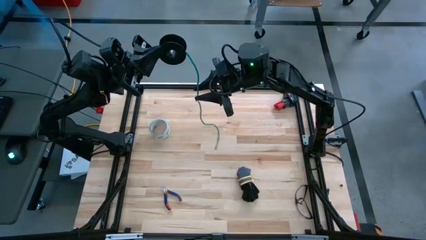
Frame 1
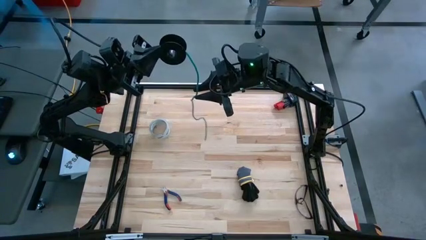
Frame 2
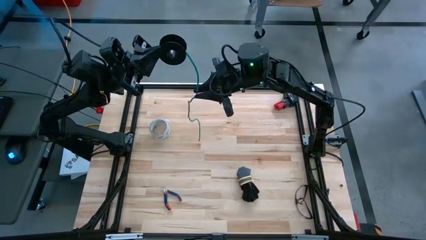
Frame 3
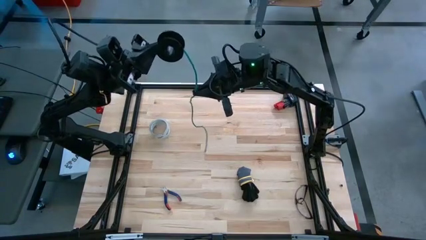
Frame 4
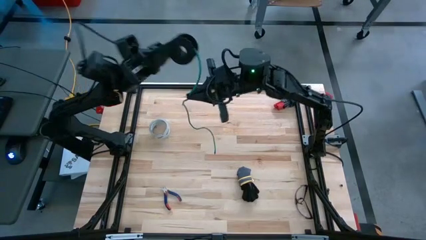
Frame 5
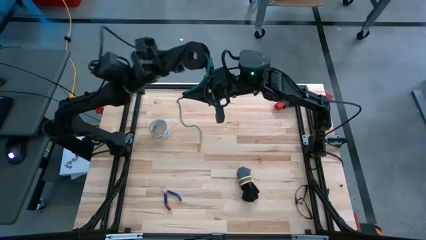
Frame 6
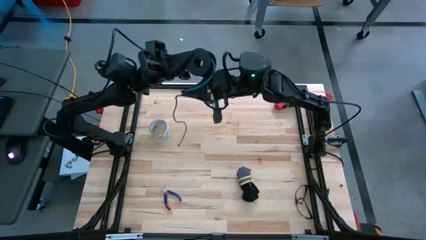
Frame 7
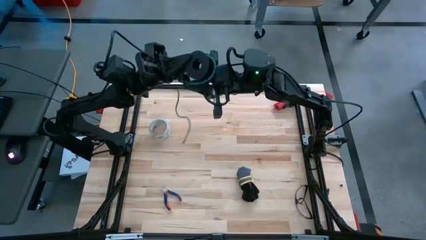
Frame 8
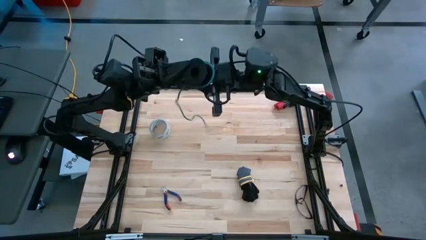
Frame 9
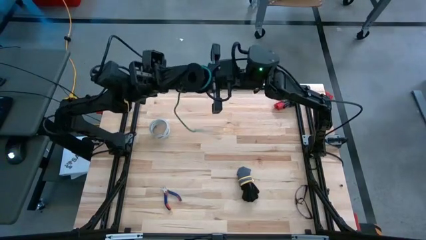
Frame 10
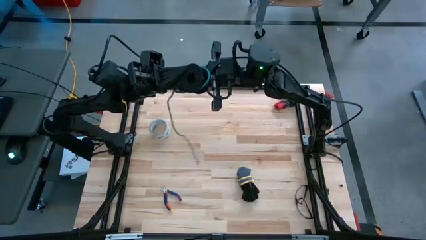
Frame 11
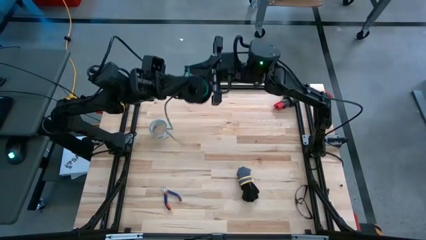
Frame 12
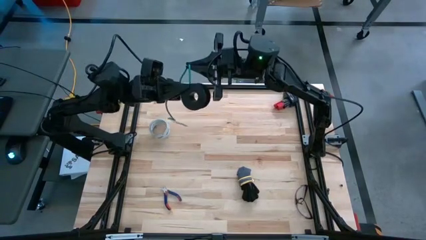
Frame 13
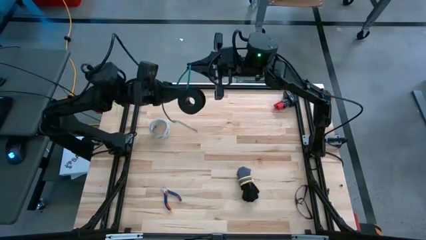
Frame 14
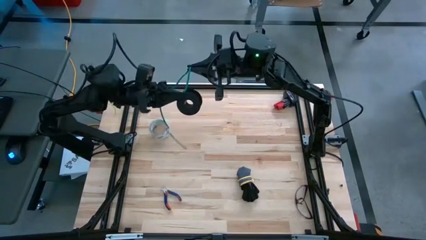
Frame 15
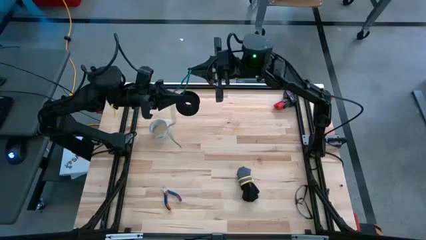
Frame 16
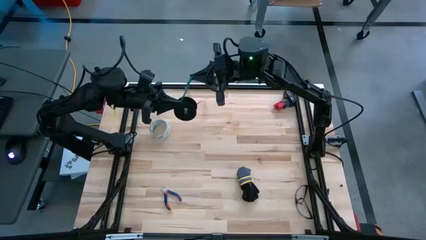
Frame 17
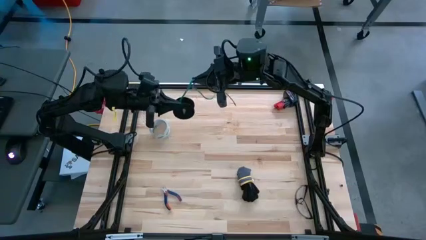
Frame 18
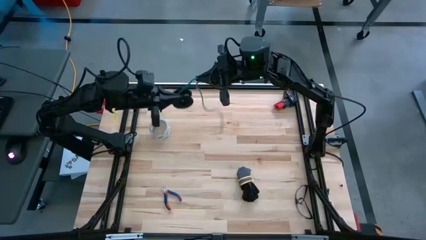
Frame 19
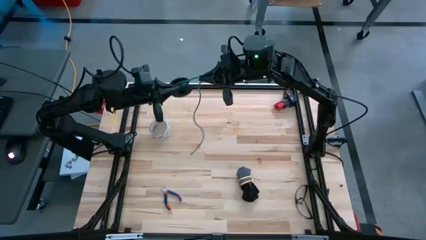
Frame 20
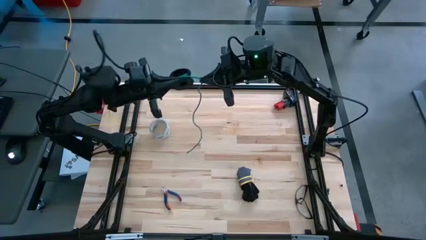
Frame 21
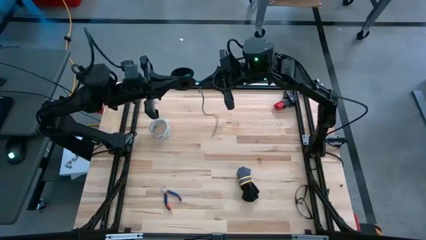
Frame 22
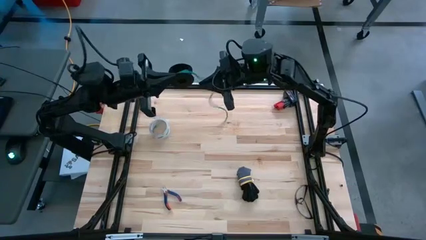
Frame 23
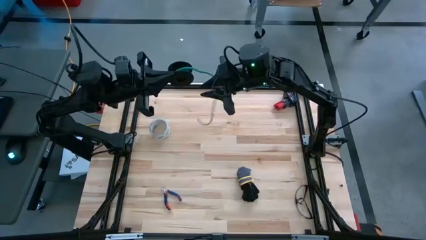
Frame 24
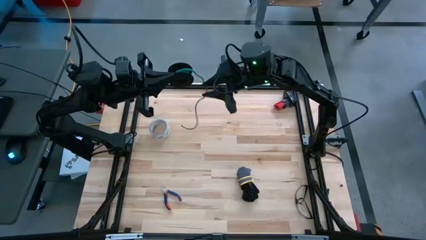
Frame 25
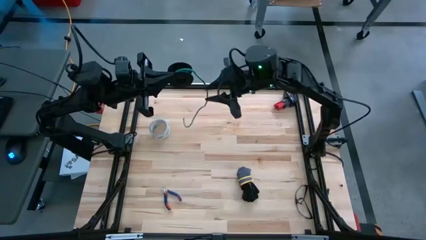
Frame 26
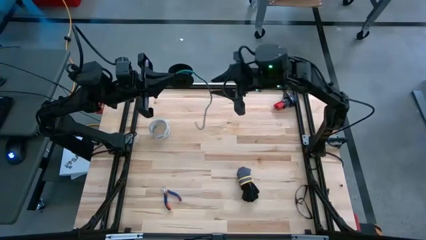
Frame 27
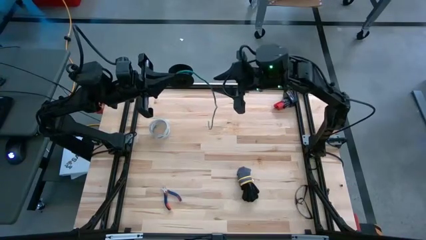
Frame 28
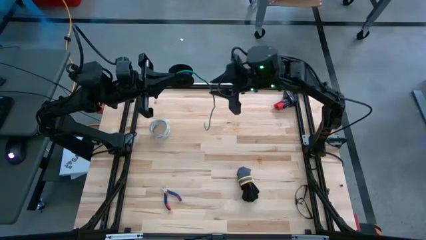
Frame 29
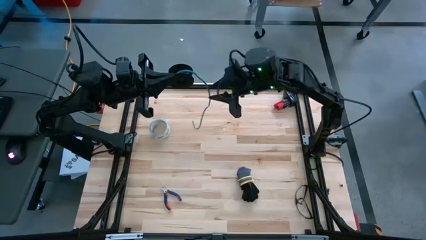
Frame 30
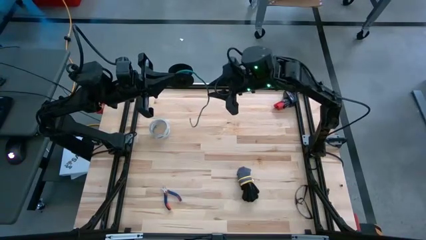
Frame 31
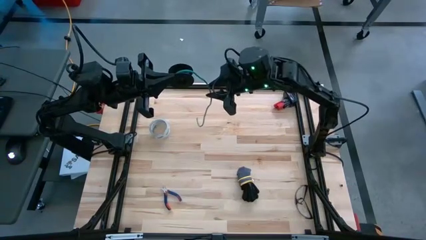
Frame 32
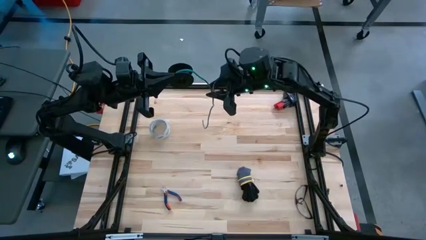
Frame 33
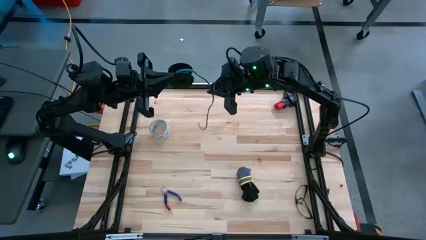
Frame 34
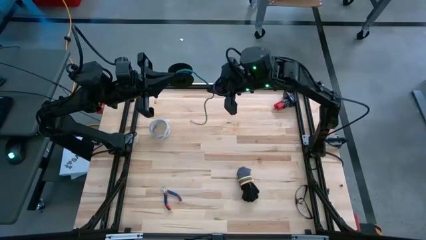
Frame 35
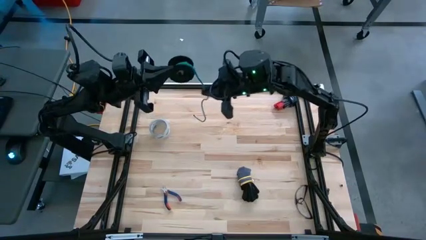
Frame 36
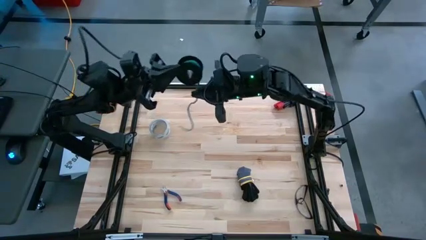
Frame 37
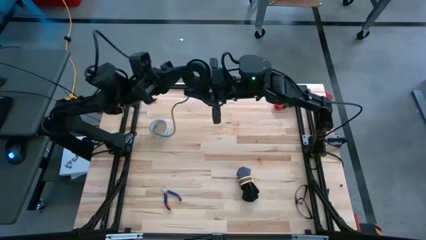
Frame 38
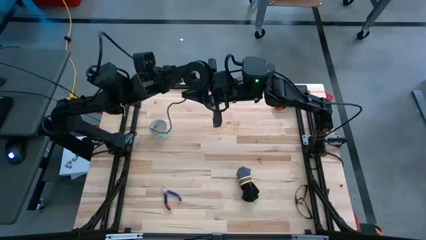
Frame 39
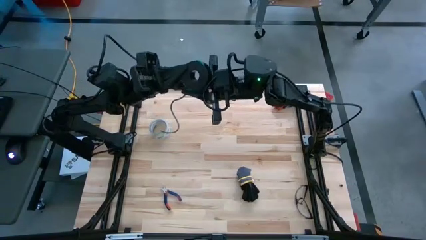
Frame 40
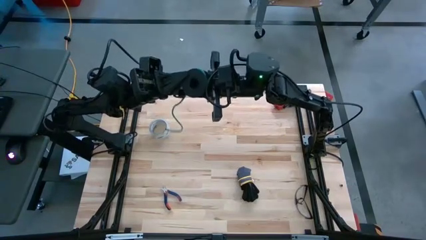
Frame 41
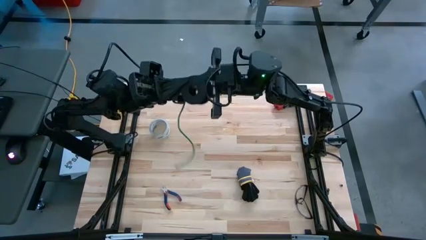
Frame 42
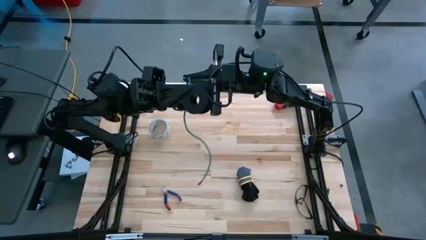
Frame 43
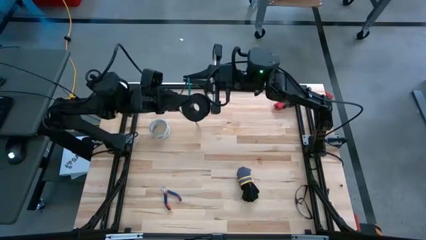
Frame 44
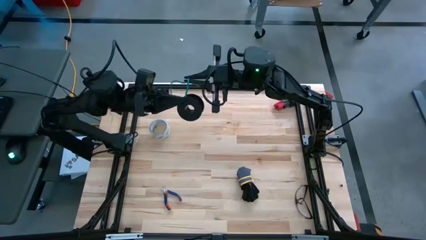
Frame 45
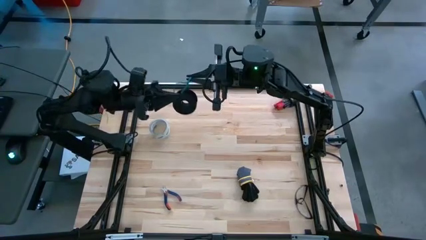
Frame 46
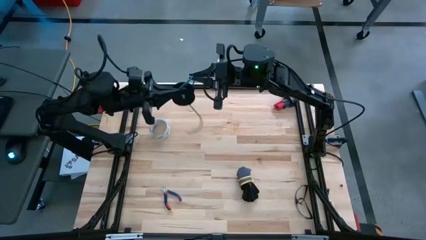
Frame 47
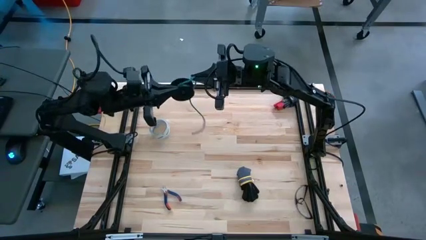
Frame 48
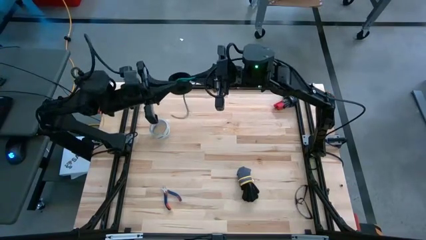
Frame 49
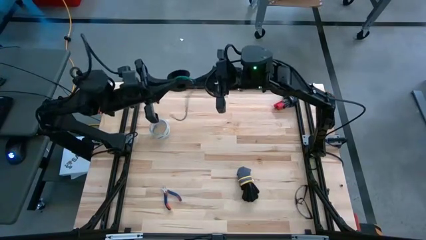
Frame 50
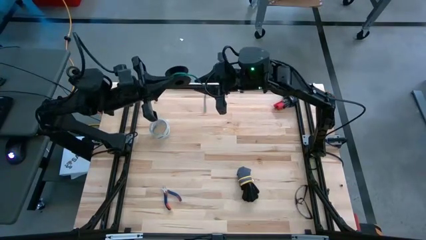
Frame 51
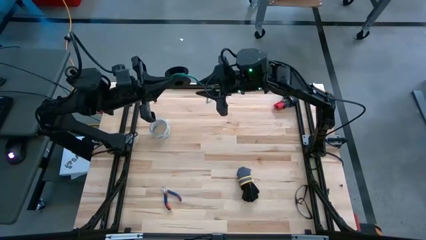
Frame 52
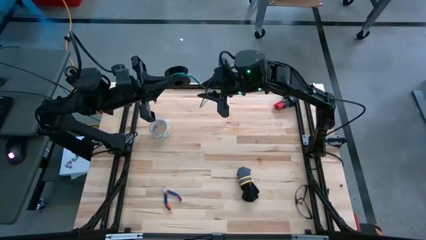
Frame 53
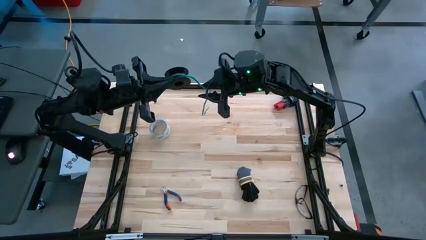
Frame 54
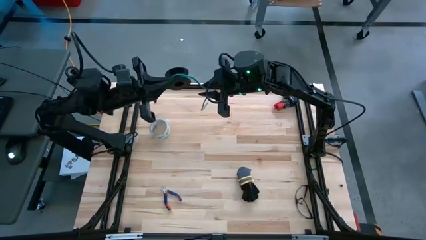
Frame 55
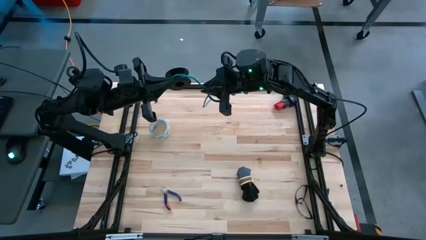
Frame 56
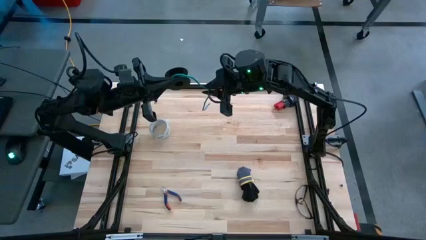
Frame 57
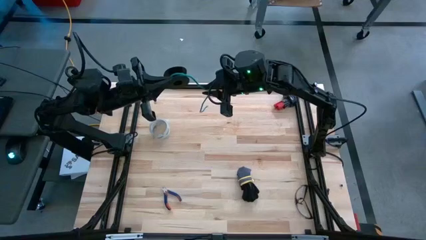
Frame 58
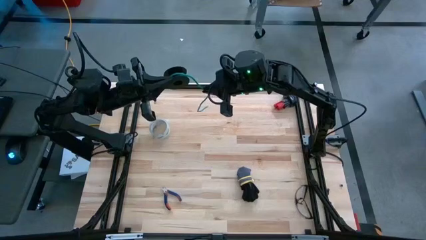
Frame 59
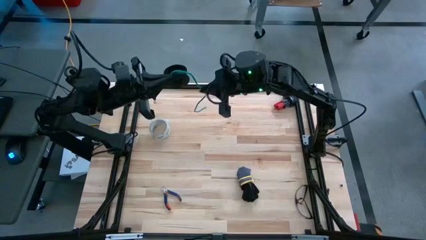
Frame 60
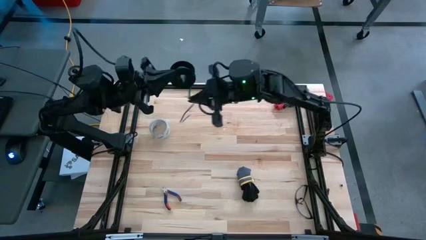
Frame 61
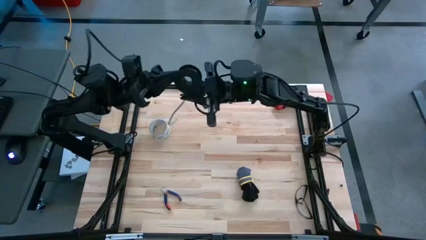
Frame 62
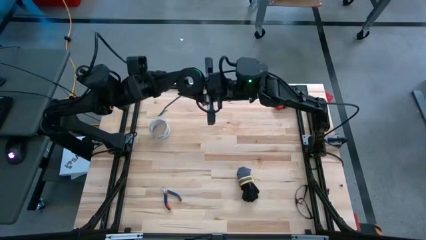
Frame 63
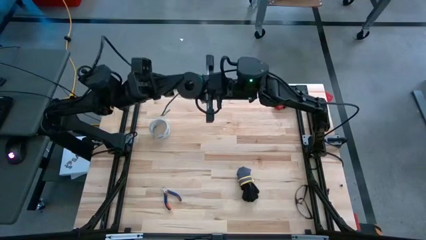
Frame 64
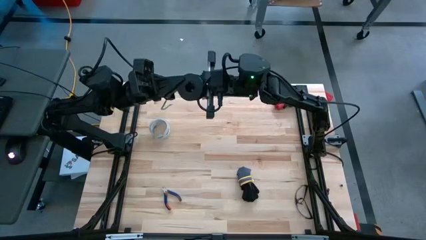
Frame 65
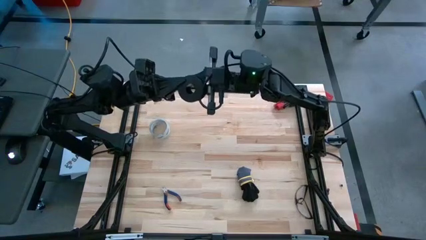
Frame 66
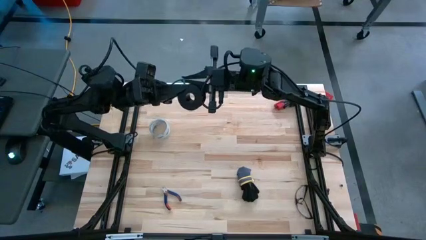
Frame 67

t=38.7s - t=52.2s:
Task: Coil cords
Coil the green wire on the spool

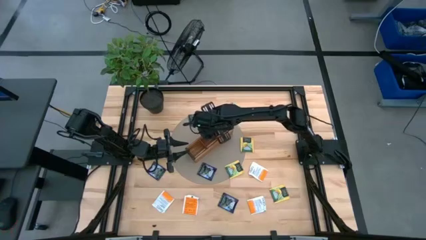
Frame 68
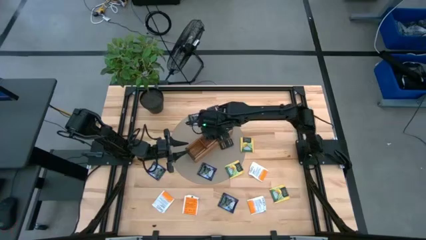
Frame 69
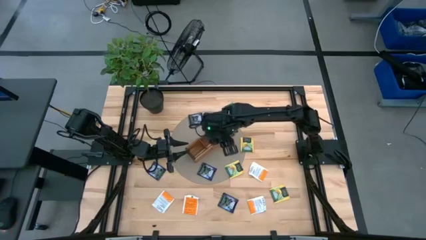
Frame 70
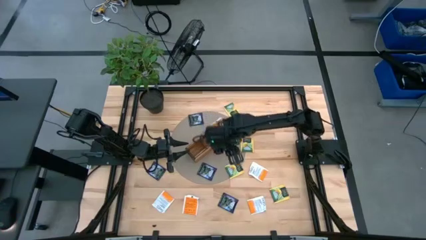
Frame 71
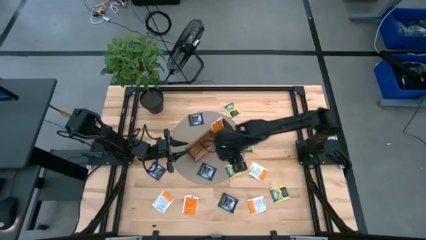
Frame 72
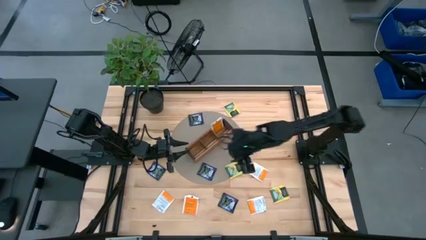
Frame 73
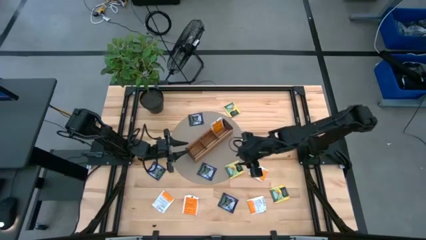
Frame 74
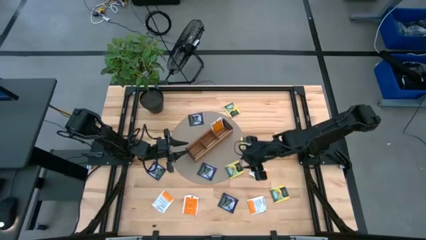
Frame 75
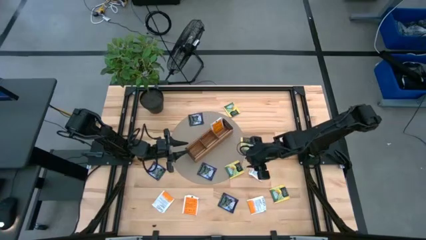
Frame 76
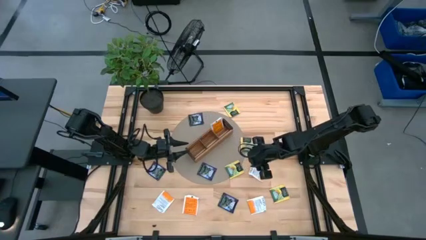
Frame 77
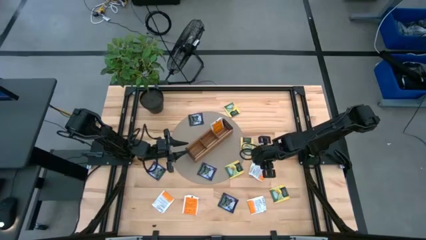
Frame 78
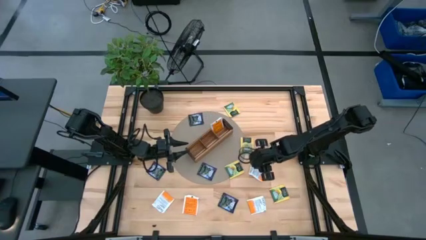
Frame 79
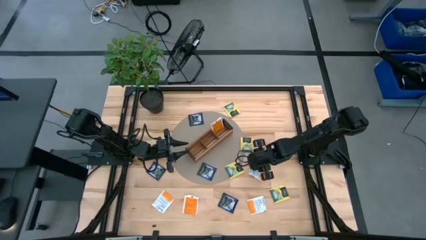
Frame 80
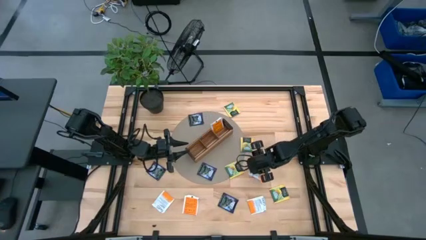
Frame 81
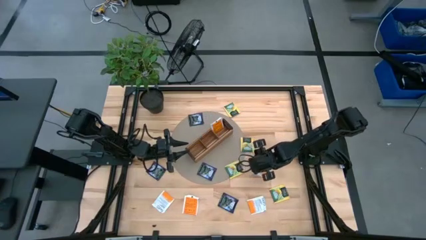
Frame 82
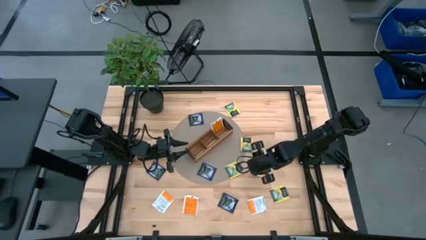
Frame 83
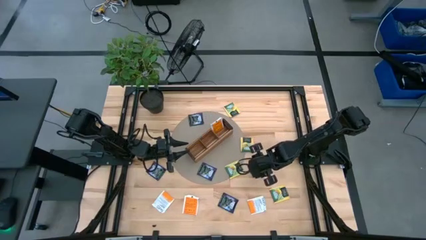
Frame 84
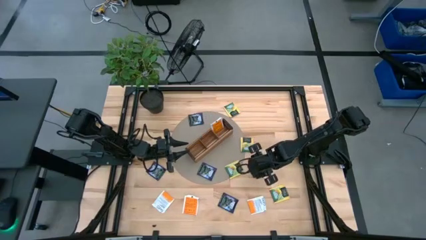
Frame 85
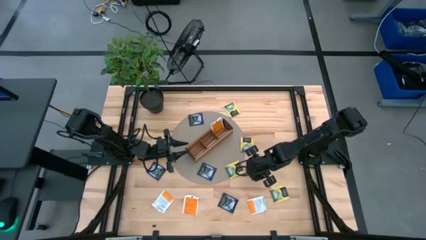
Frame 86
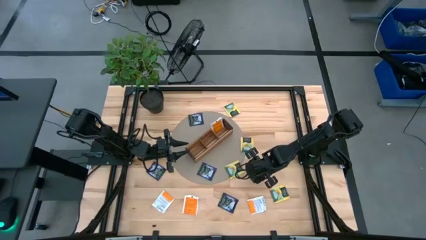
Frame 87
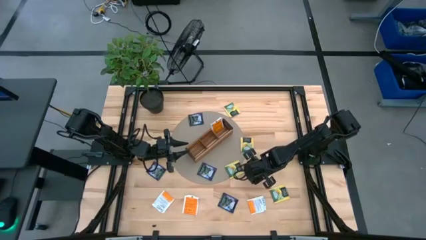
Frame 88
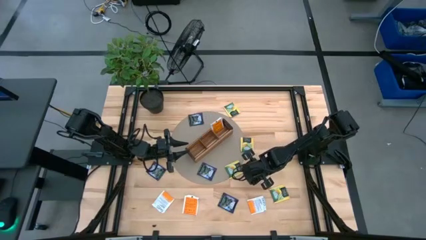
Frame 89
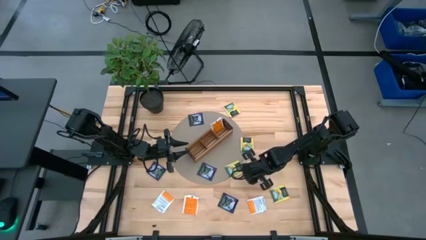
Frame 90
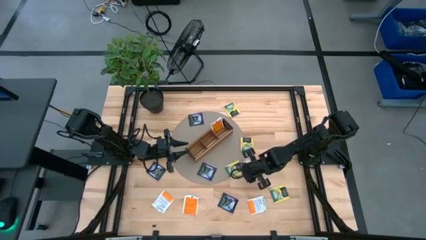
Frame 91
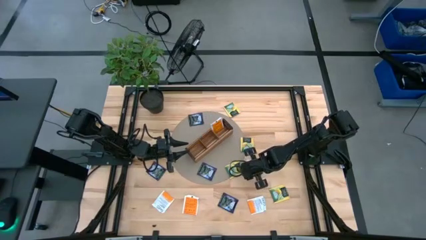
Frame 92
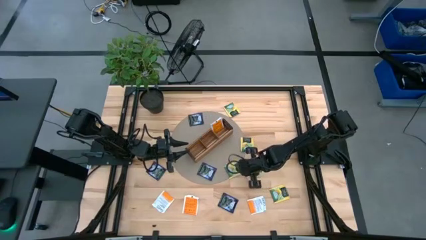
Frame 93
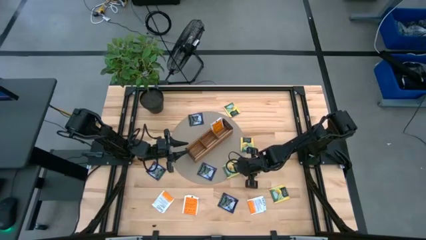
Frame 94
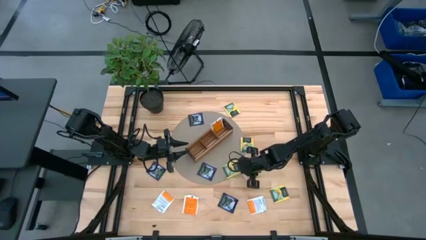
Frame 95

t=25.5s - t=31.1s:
Task: Pick & Place Tea
Put the orange tea bag into the right section of the wooden organizer
